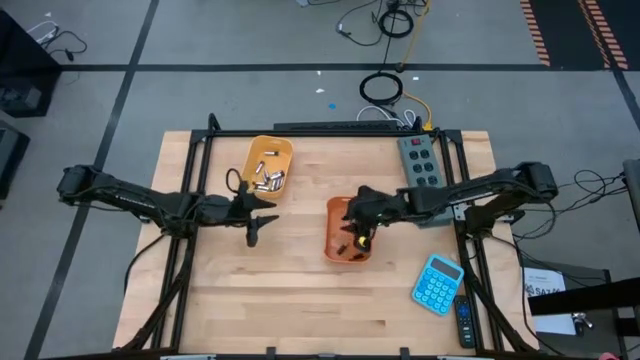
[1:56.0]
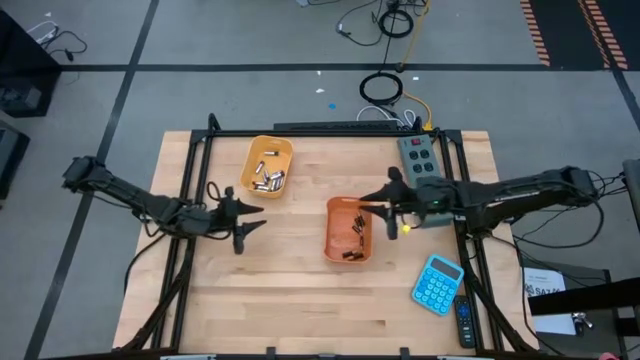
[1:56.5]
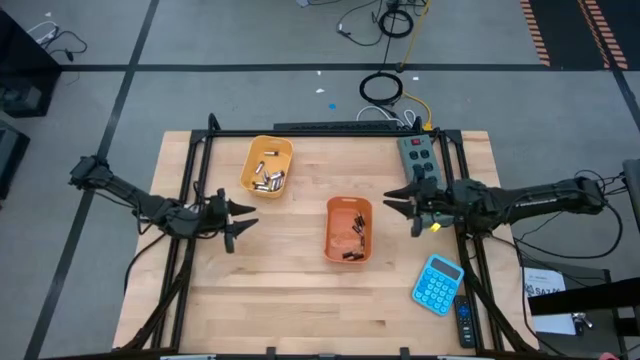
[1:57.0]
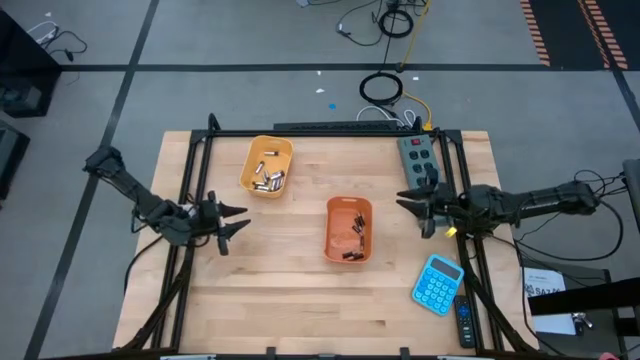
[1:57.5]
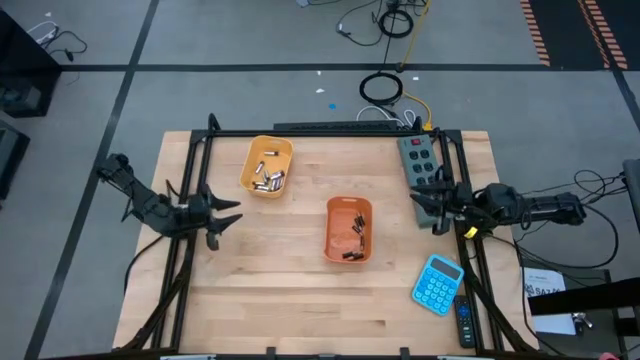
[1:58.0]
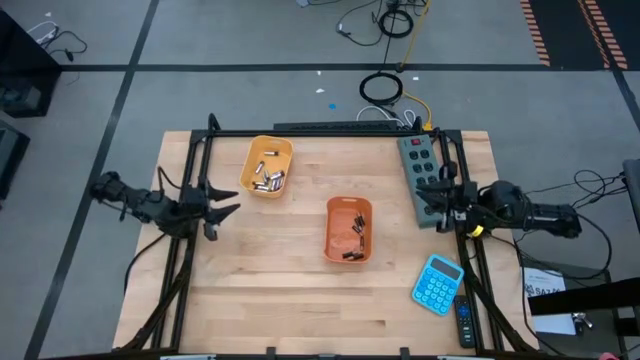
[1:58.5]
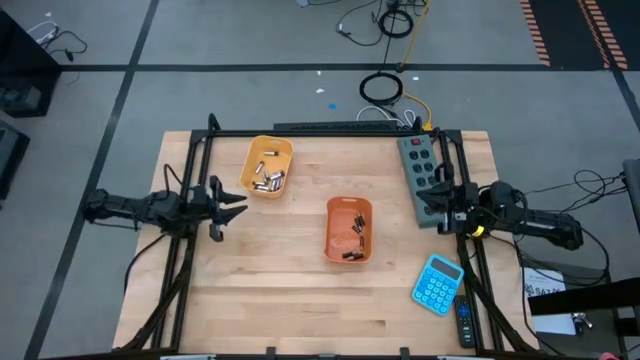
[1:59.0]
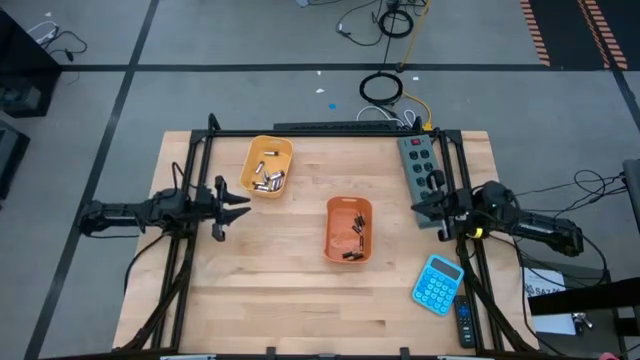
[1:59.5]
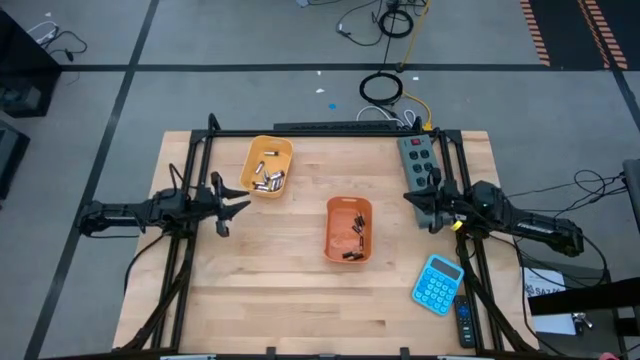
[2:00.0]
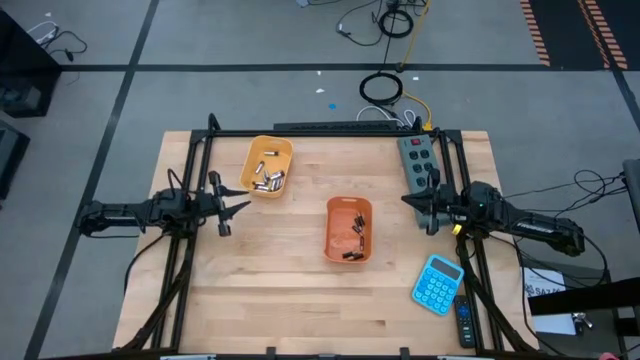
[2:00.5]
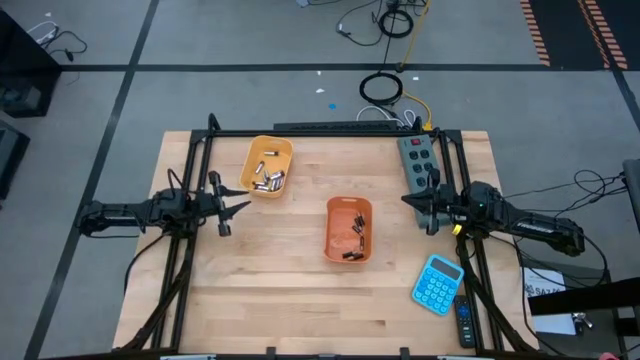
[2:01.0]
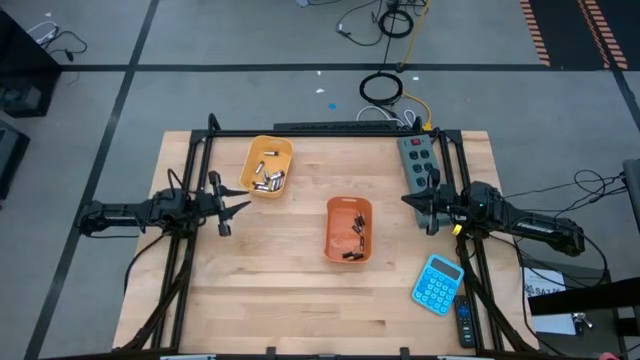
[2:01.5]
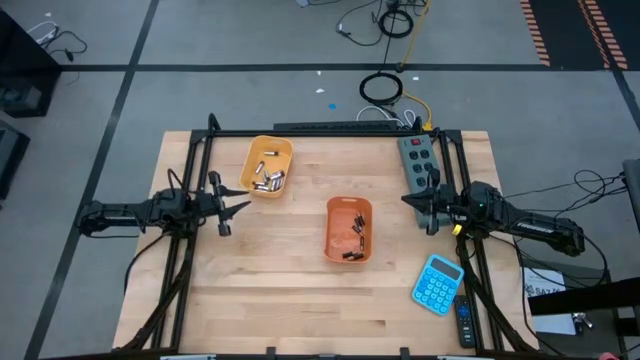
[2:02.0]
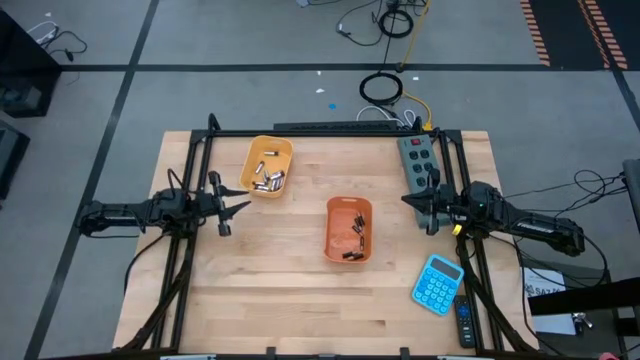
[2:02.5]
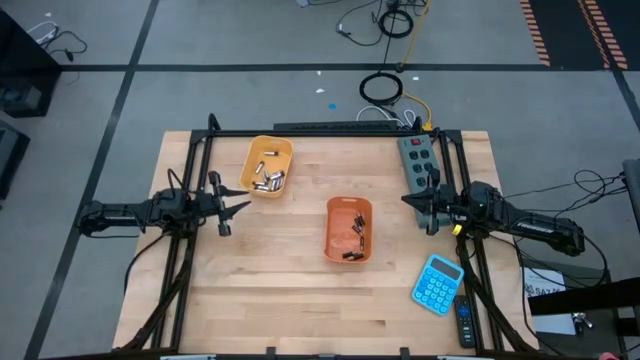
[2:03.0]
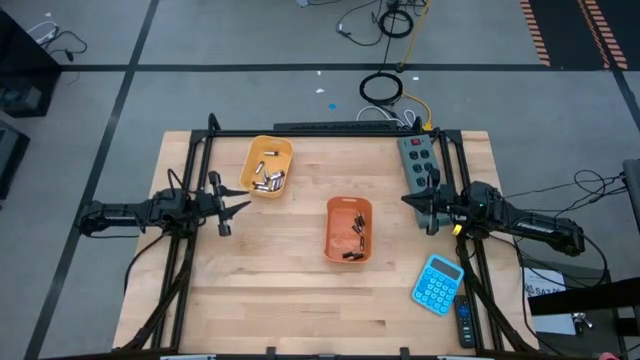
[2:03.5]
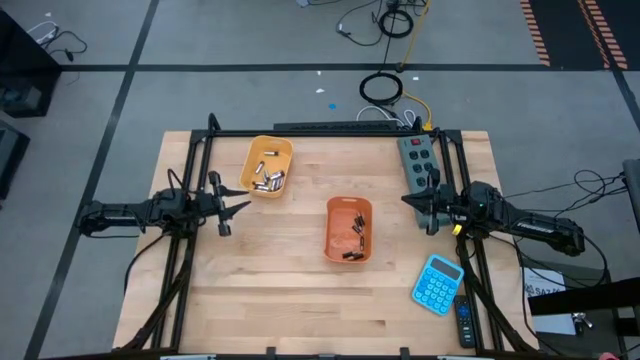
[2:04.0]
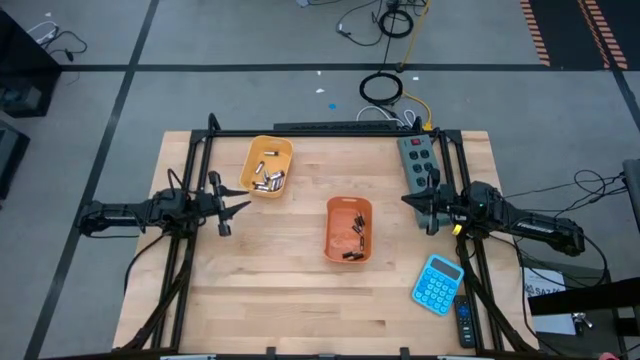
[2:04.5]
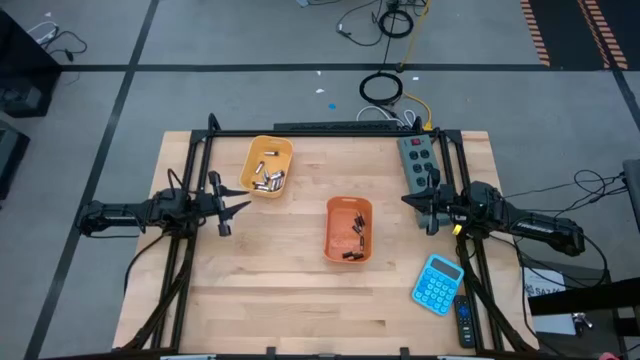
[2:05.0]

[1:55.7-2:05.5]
Task: Sort batteries
Return to Home Position

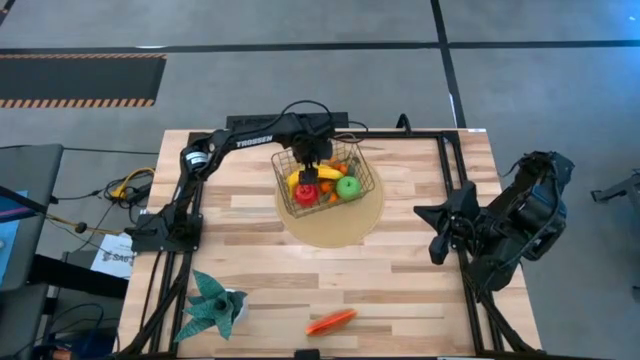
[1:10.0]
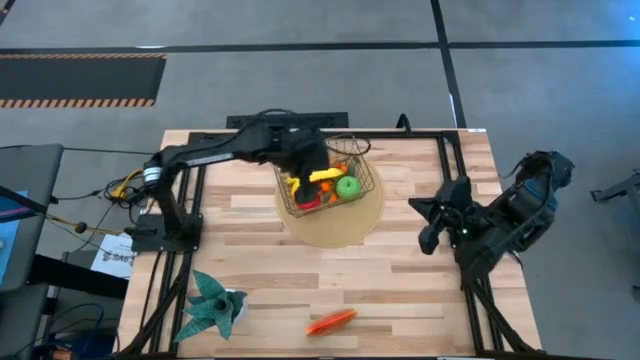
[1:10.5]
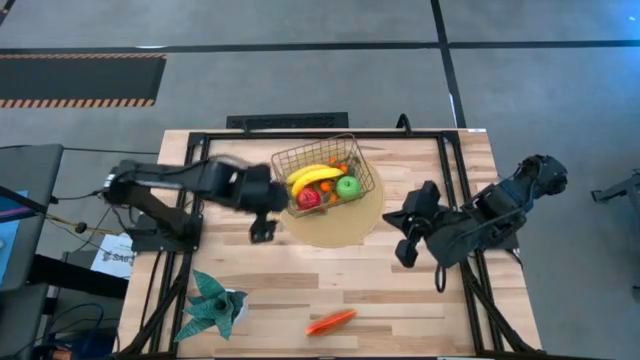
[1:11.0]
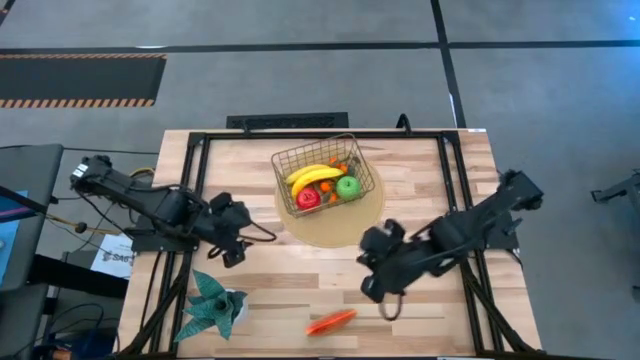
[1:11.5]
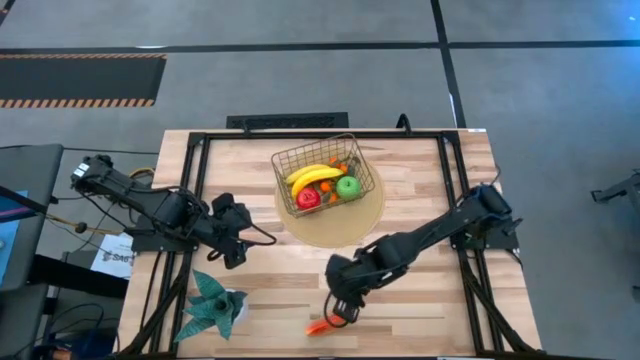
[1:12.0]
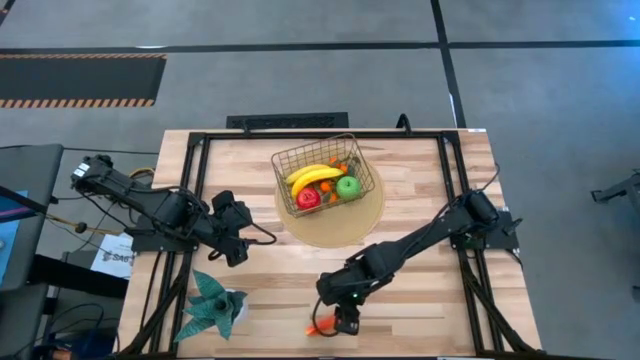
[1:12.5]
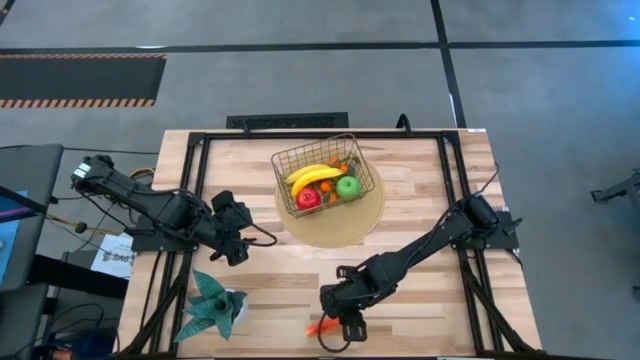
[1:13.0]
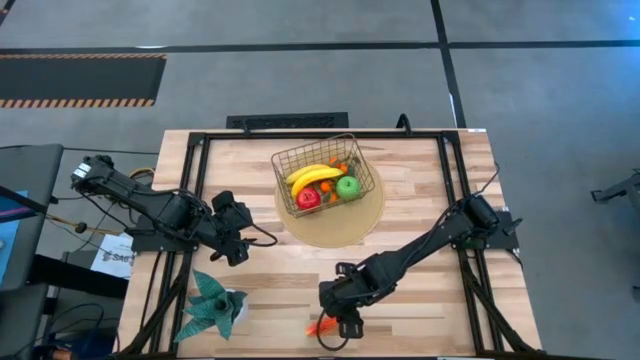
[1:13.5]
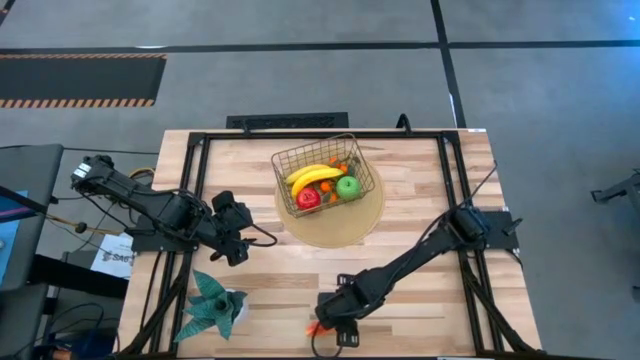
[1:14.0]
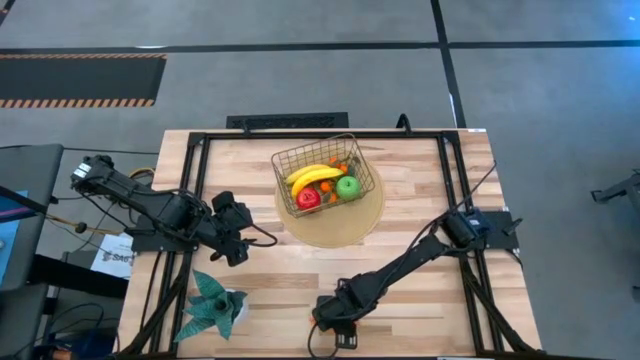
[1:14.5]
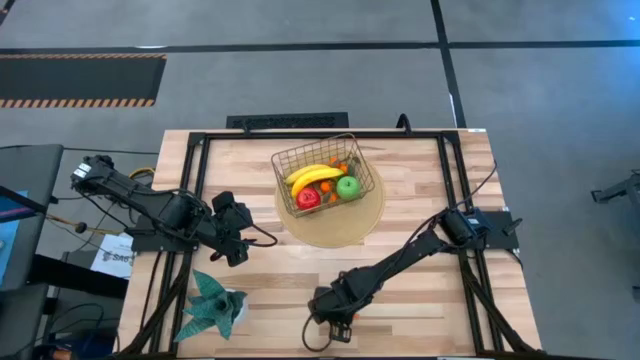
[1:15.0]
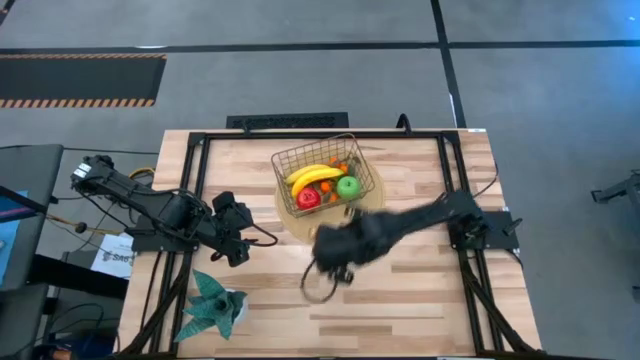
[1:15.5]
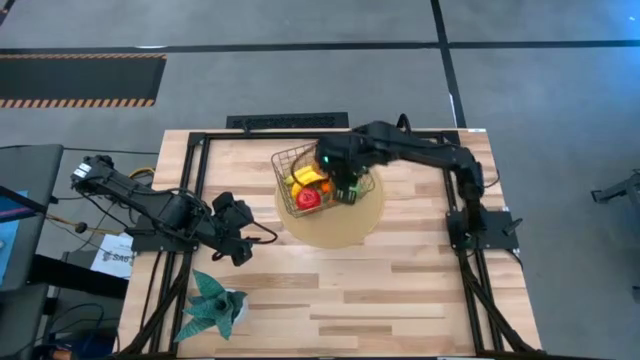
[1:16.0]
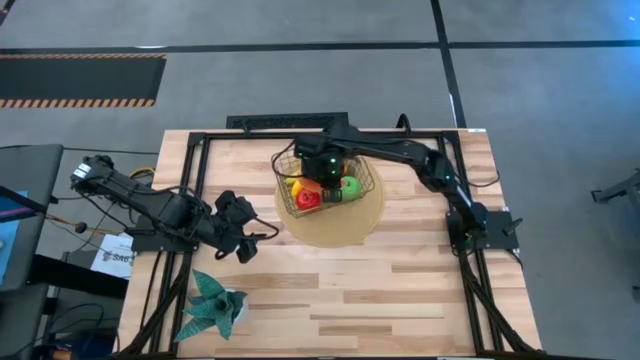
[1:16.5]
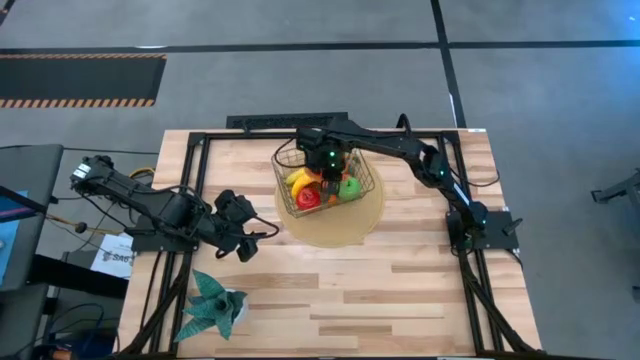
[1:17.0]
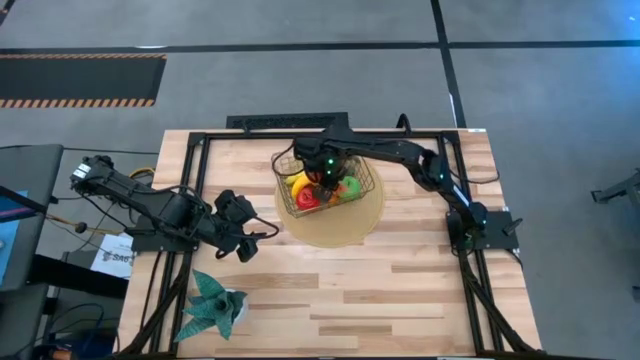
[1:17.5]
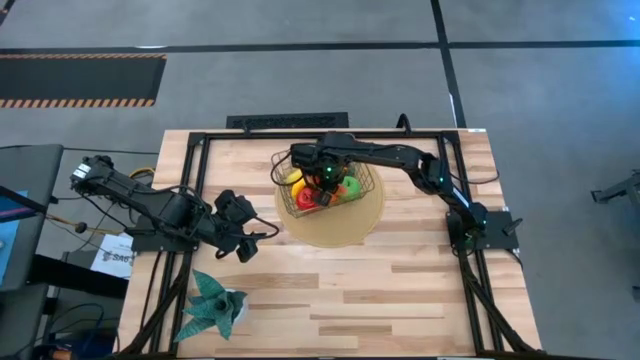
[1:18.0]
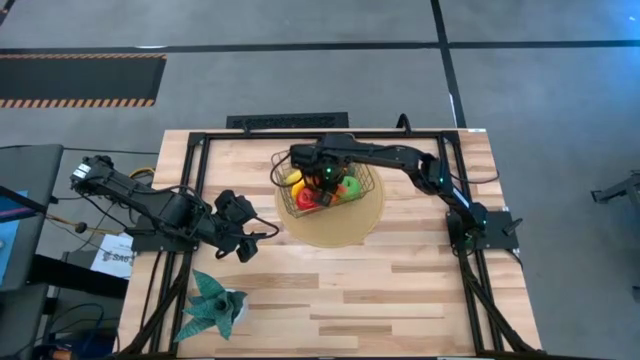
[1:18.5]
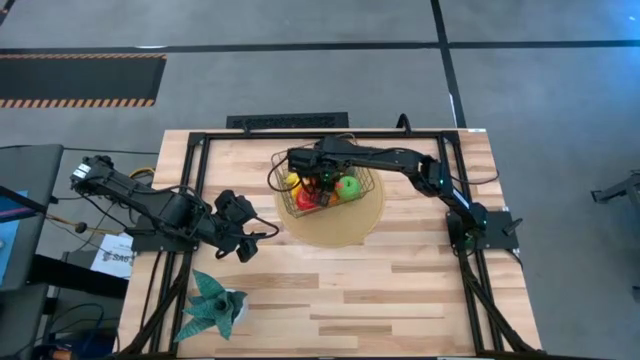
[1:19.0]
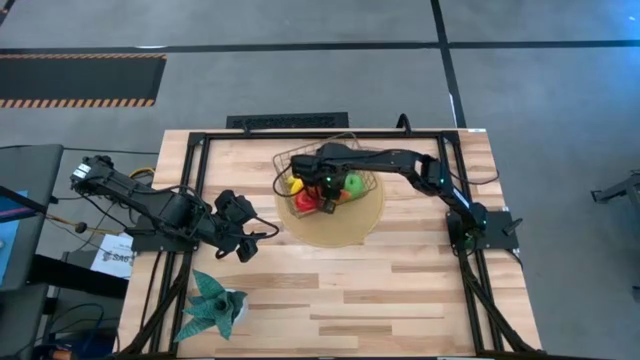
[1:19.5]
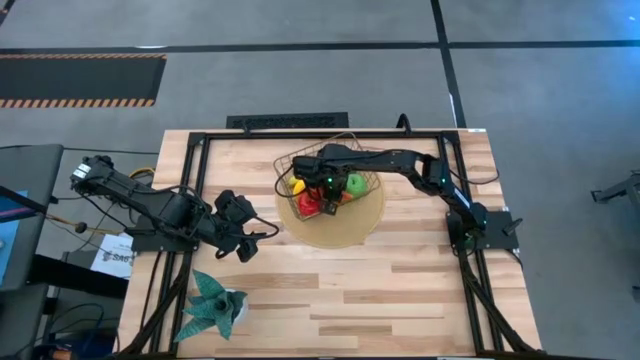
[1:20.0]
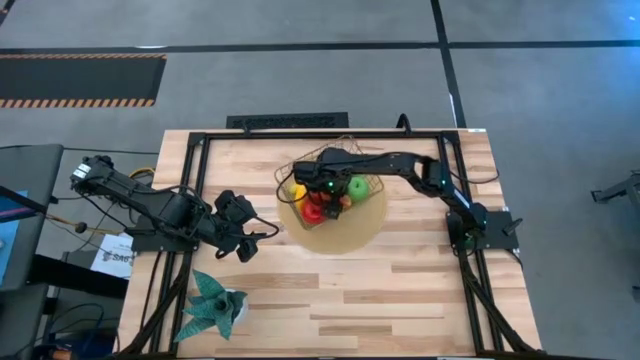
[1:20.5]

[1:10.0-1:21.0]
Task: Build produce basket
Put the watermelon into the basket

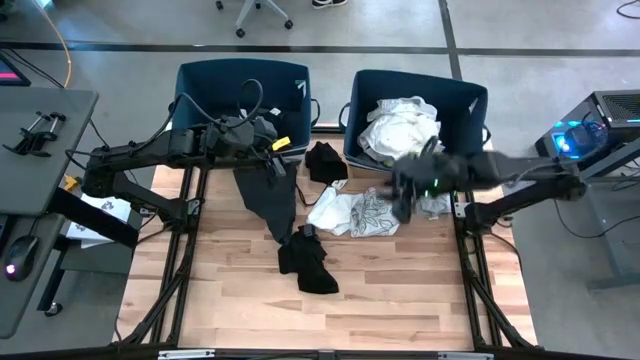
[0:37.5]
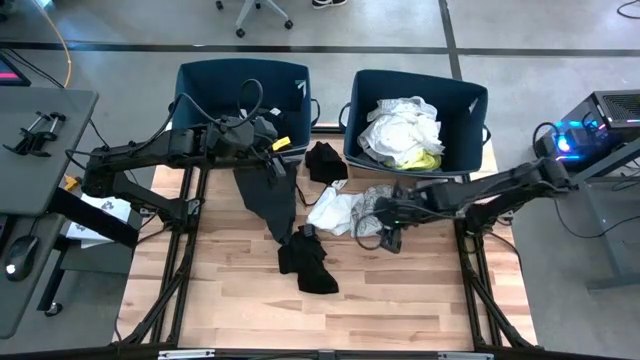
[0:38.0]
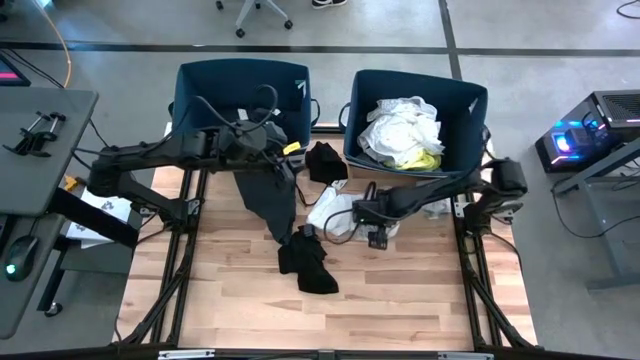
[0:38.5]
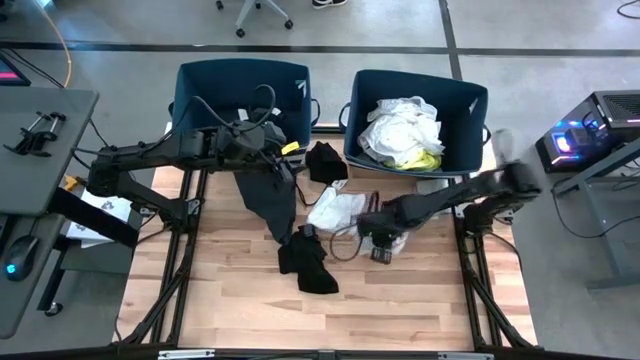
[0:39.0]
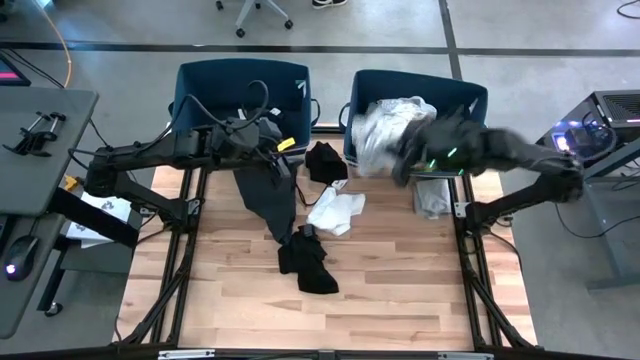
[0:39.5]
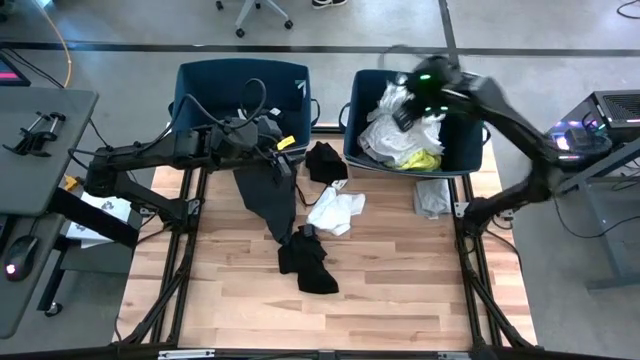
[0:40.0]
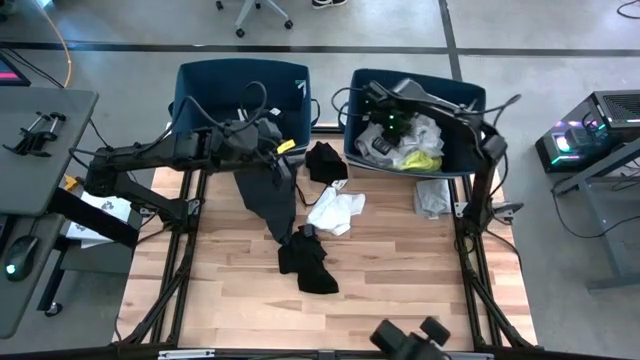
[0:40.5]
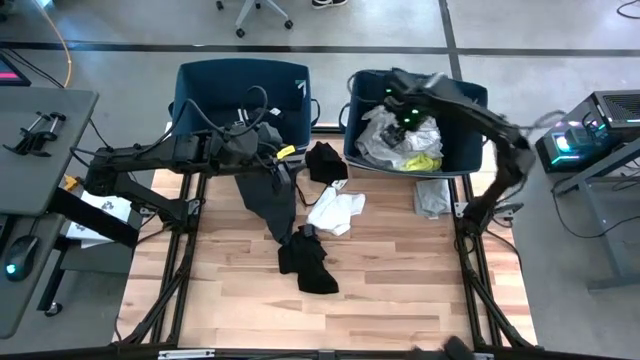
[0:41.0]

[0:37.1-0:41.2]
Task: Sort clothes
Put the white shirt in the right laundry bin
